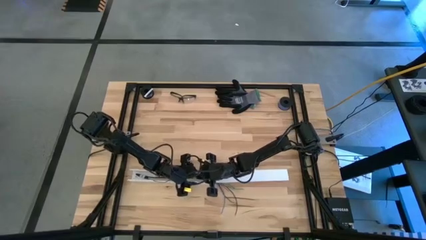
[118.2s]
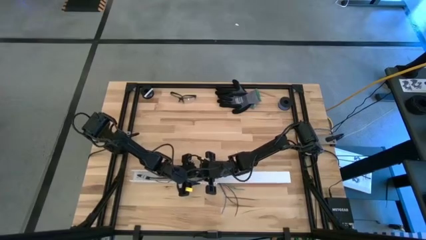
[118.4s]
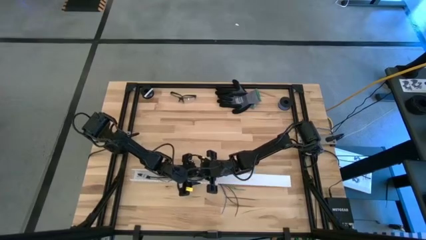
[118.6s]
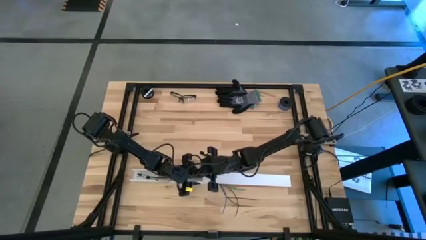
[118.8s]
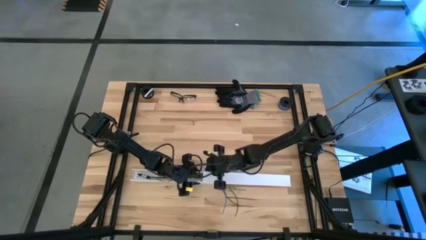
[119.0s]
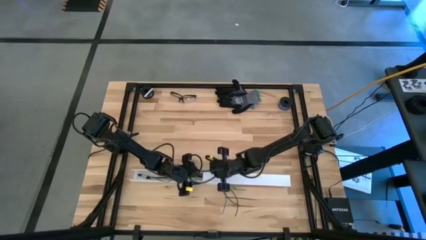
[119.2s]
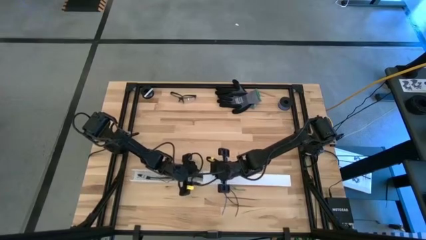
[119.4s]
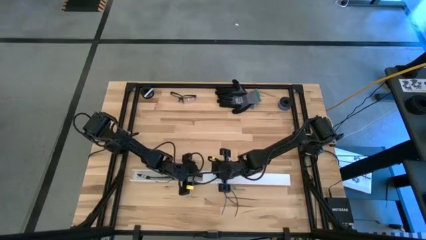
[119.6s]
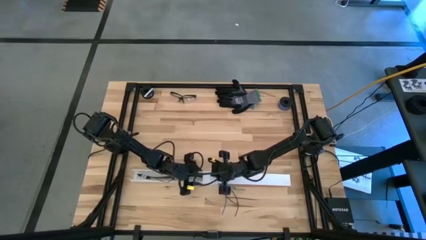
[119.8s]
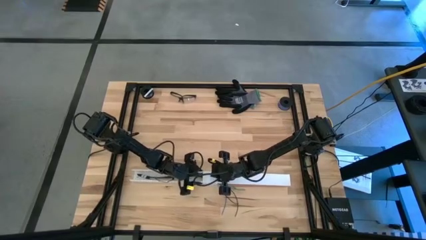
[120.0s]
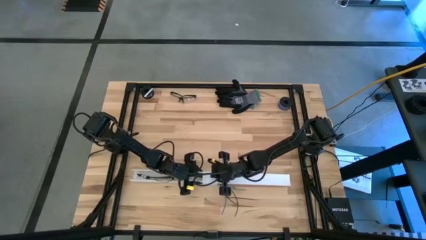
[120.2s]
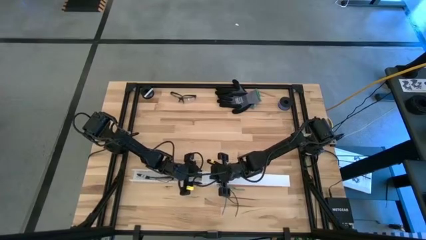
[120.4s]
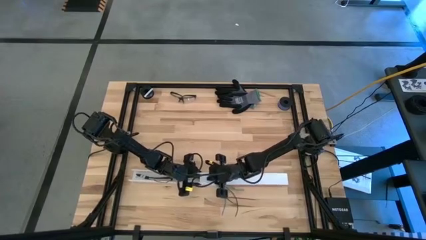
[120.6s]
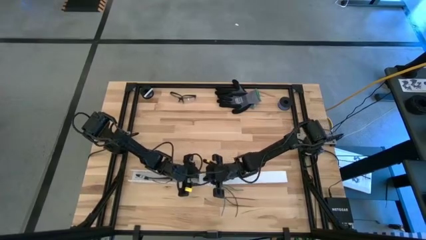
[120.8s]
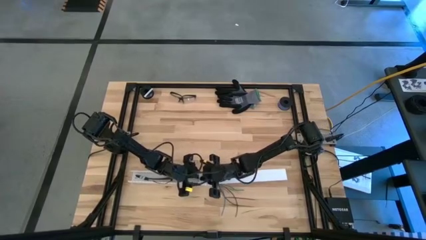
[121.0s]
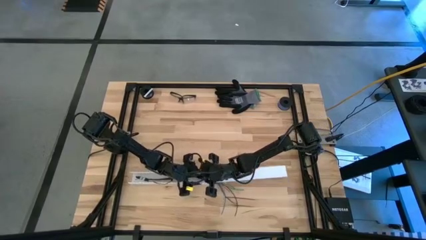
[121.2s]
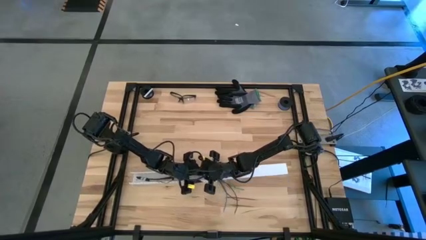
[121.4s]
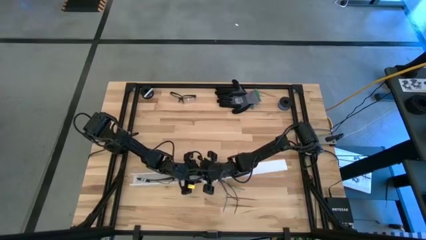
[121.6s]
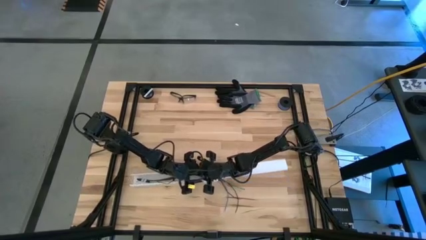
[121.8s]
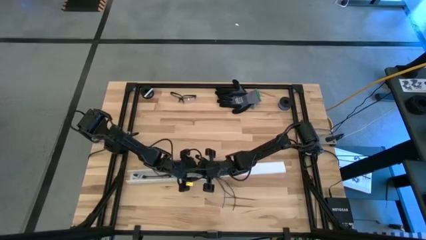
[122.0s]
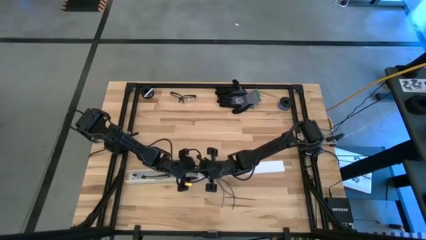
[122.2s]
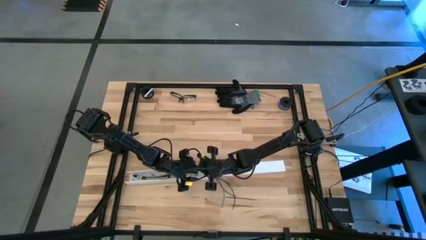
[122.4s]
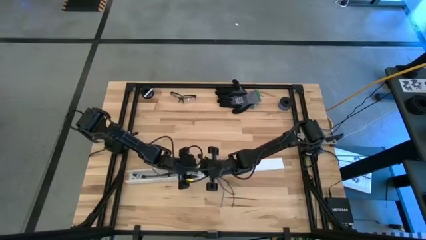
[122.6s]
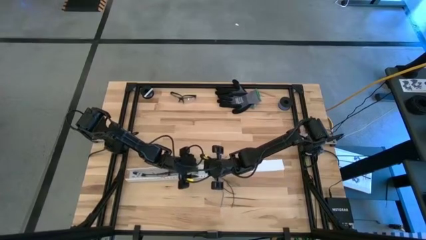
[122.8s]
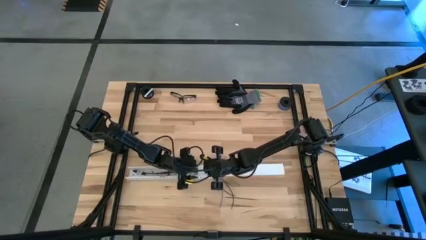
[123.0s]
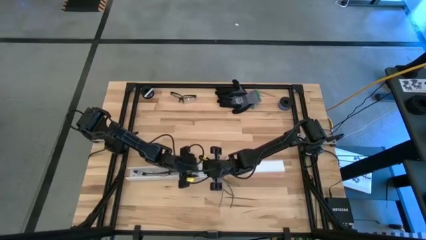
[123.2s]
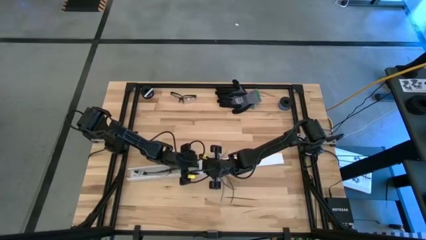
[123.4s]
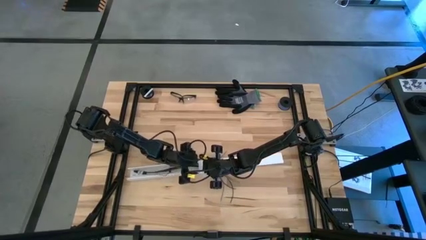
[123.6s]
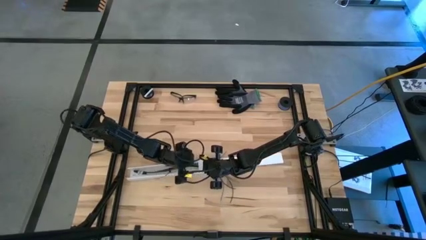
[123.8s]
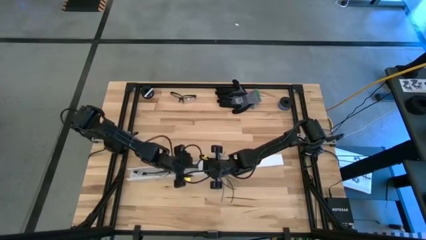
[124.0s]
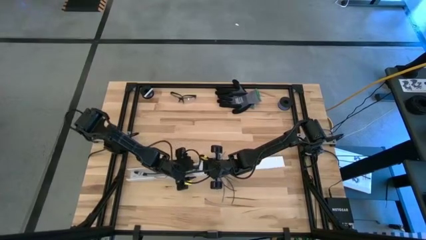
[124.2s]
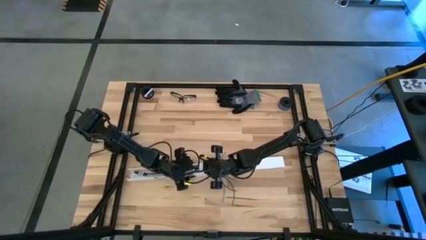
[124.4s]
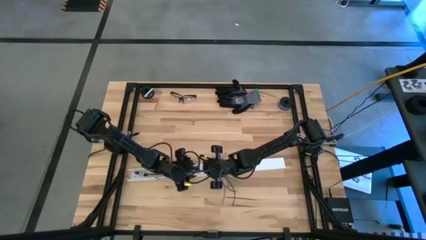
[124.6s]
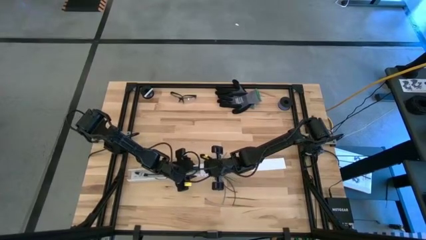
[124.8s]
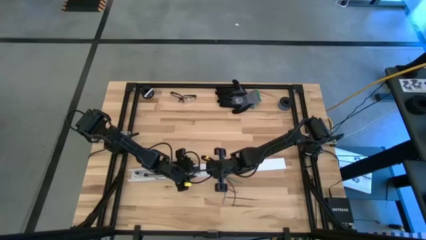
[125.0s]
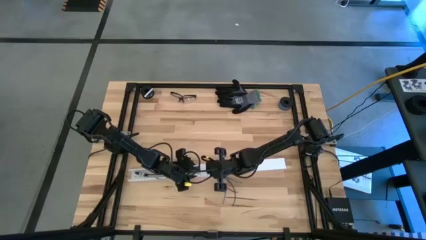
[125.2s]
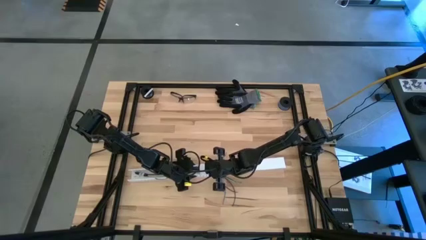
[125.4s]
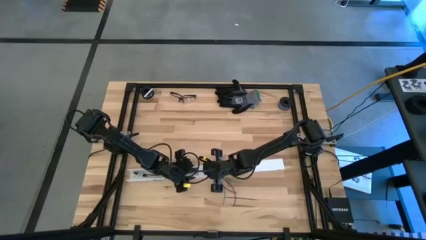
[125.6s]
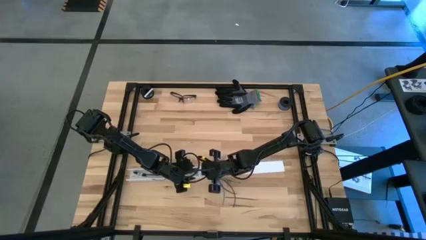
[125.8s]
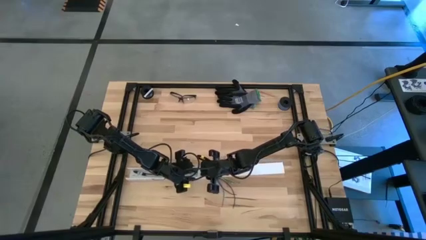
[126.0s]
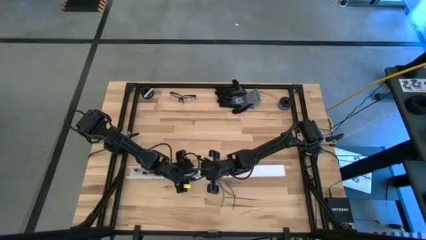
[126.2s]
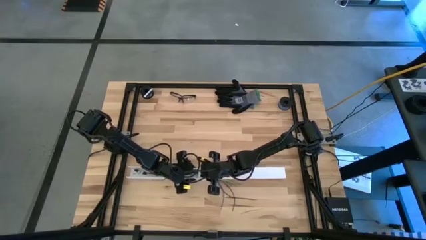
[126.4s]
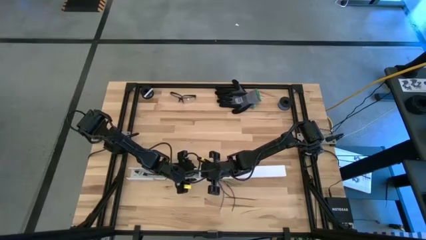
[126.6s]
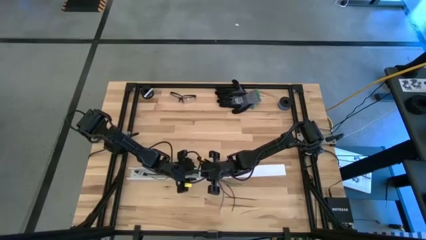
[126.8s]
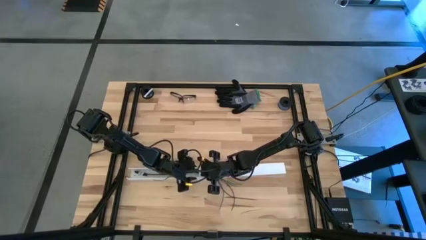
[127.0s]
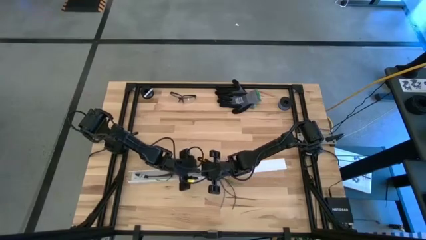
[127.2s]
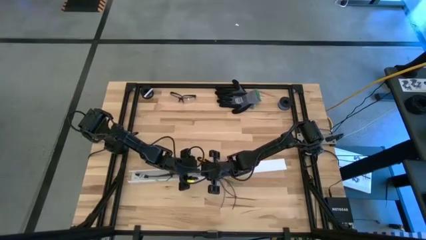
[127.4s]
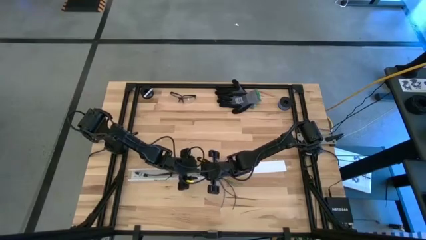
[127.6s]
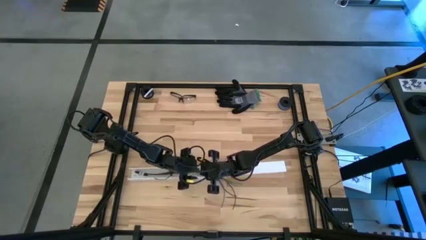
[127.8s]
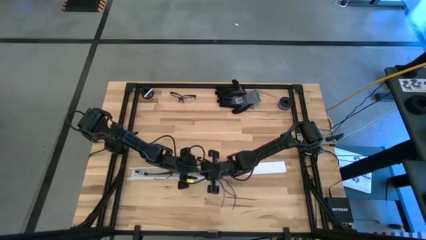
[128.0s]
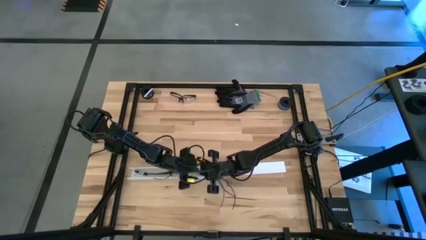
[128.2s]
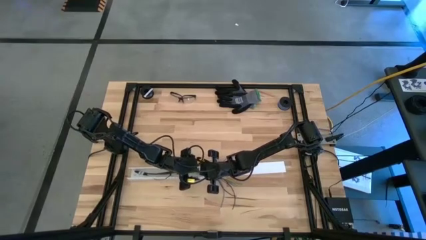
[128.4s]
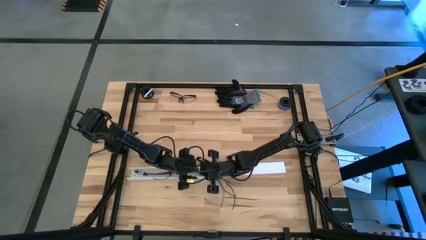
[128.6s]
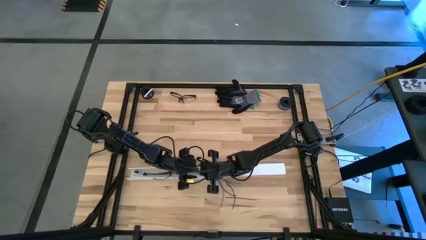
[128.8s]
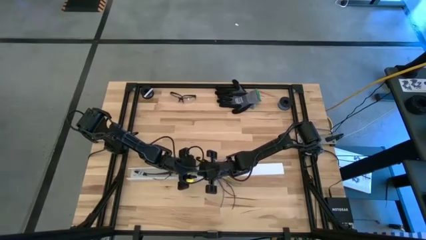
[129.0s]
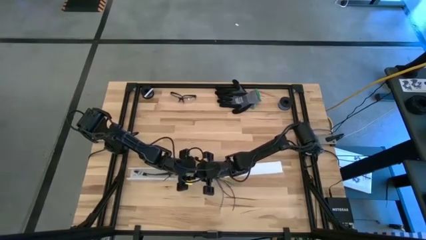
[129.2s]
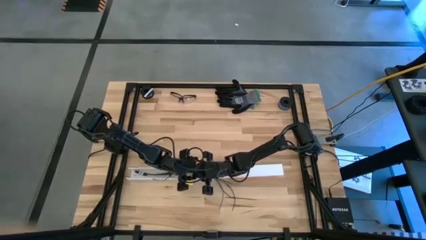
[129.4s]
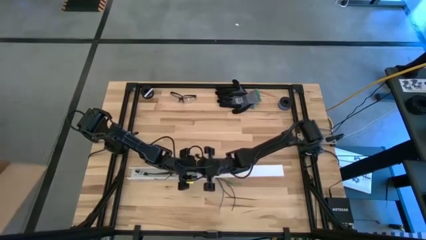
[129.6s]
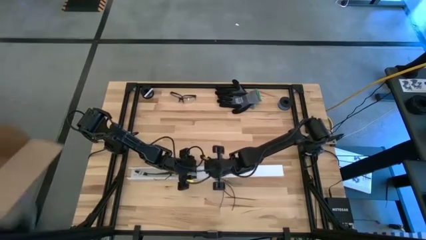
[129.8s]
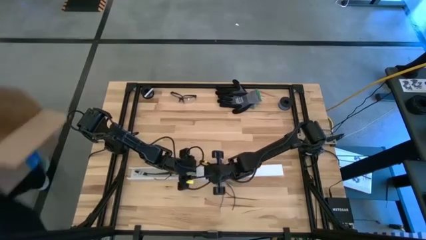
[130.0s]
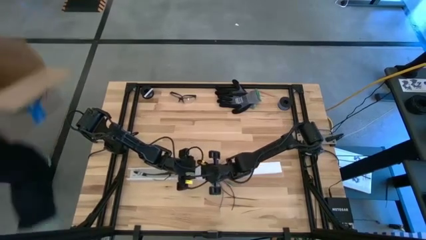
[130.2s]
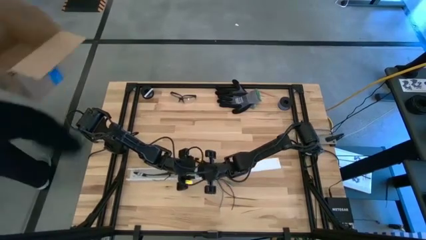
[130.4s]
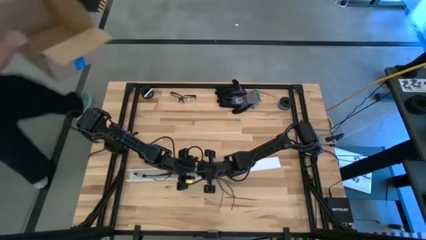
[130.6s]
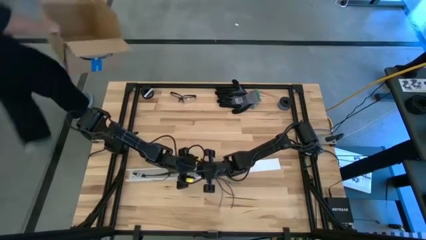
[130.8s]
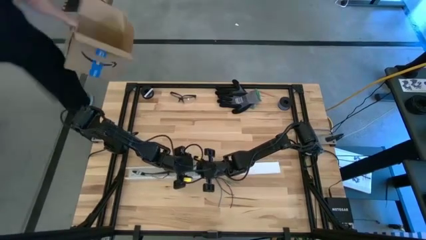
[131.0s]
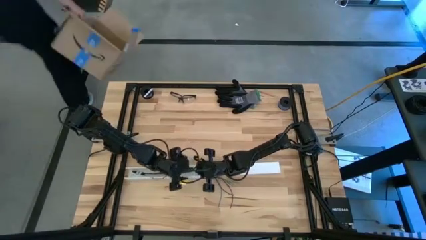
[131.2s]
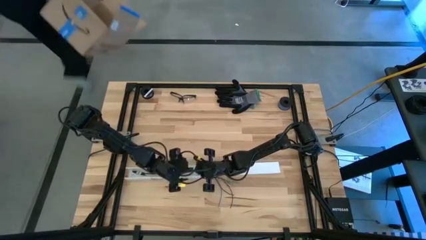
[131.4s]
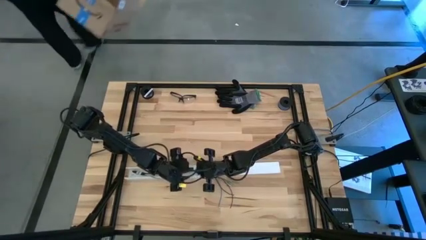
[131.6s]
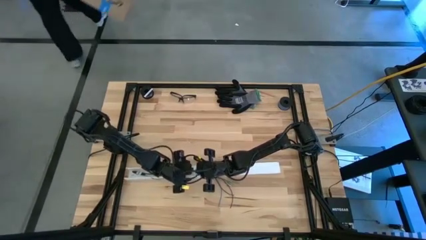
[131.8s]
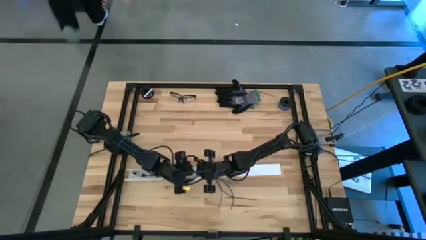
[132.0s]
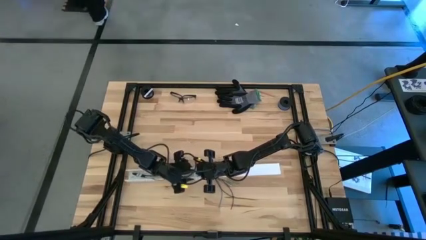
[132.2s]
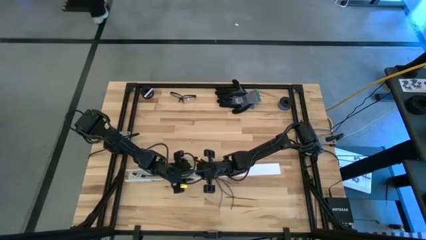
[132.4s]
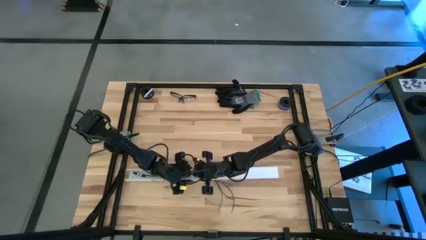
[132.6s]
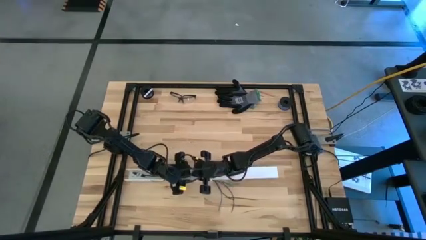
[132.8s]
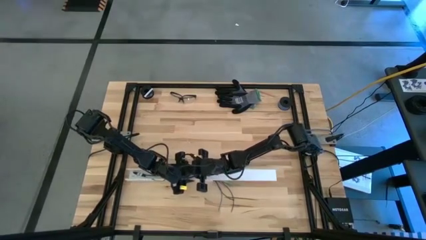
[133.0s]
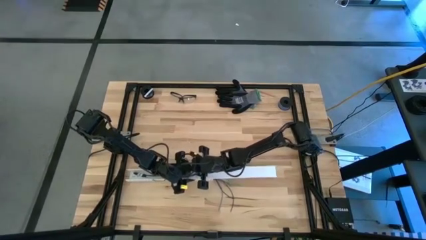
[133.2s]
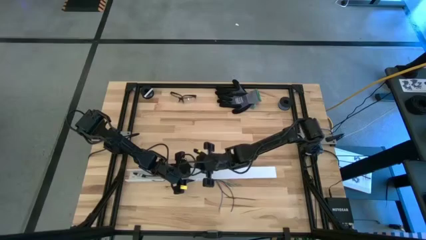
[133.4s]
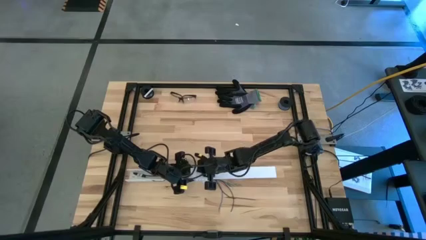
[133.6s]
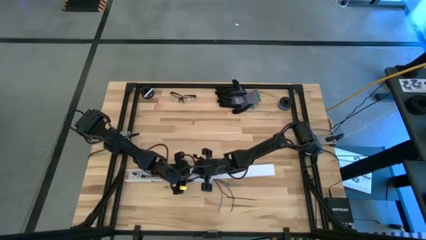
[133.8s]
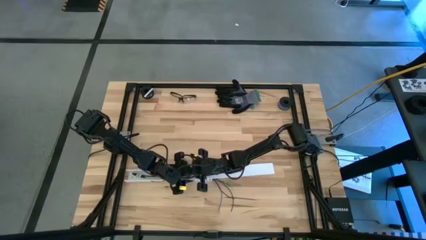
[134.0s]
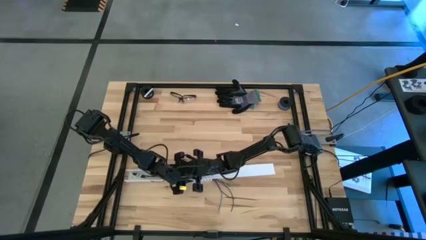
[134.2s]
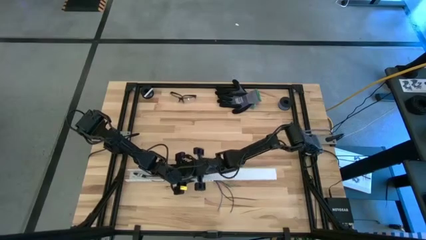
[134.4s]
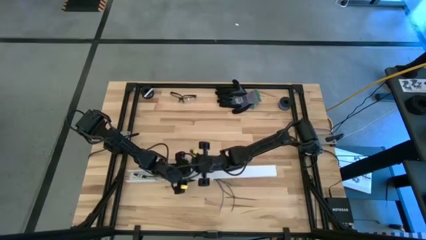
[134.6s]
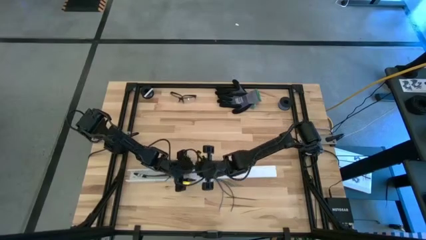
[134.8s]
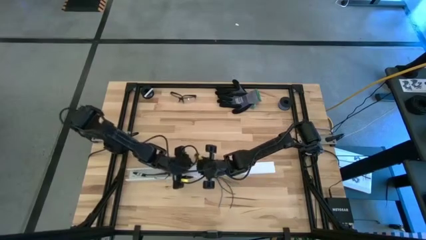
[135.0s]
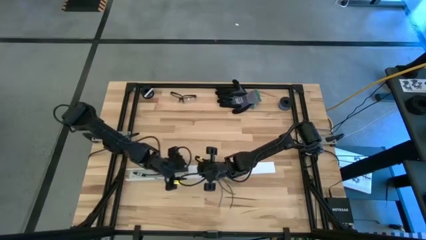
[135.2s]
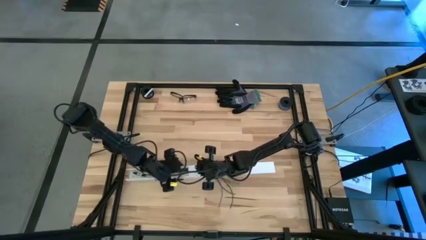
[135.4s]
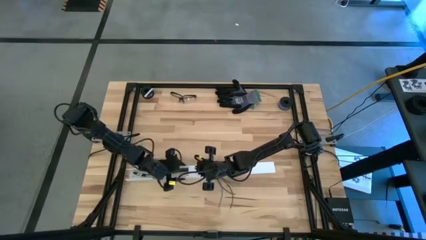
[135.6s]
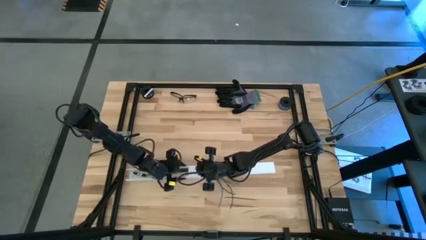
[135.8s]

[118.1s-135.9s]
Task: Ziptie cables
Close the cable duct
